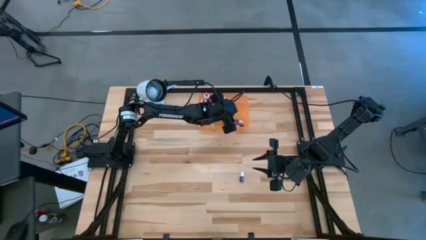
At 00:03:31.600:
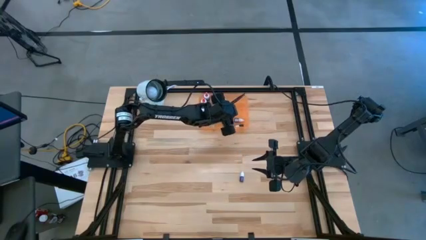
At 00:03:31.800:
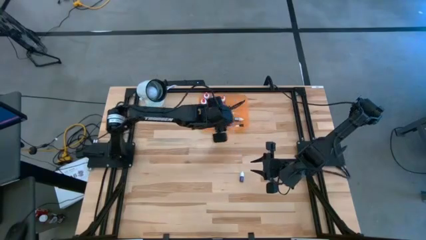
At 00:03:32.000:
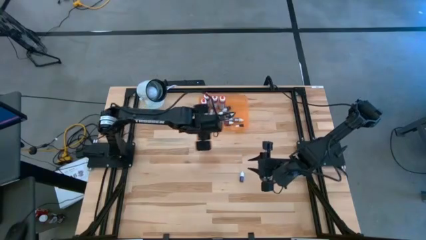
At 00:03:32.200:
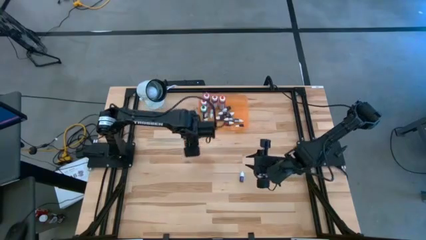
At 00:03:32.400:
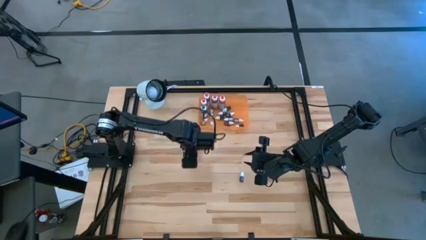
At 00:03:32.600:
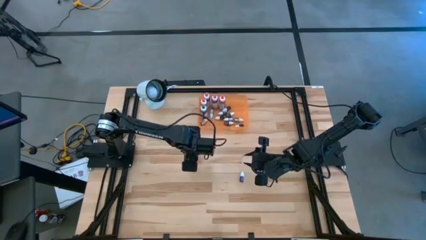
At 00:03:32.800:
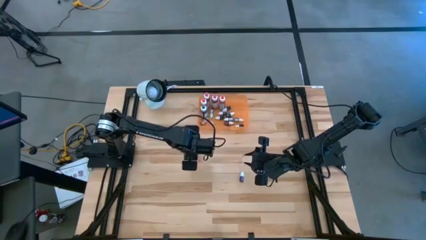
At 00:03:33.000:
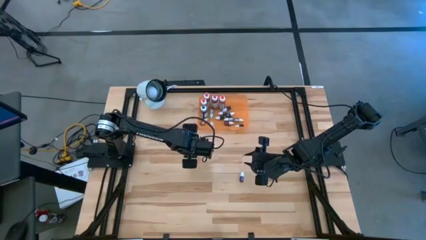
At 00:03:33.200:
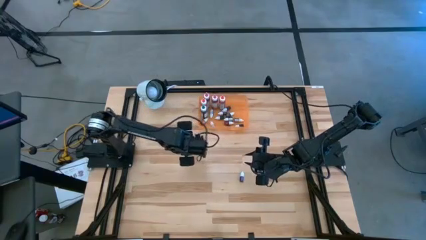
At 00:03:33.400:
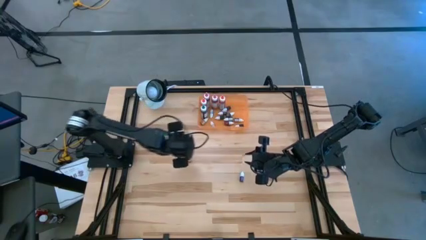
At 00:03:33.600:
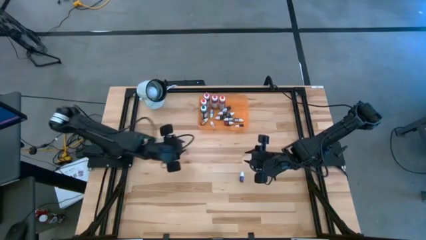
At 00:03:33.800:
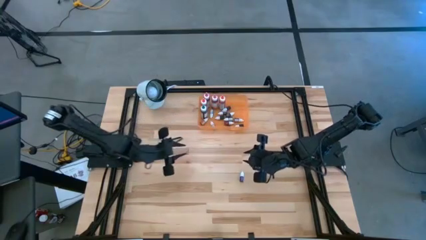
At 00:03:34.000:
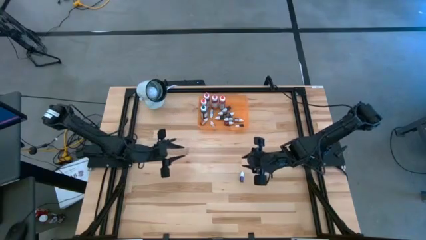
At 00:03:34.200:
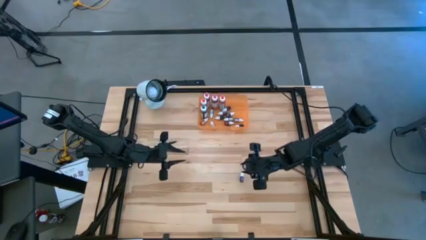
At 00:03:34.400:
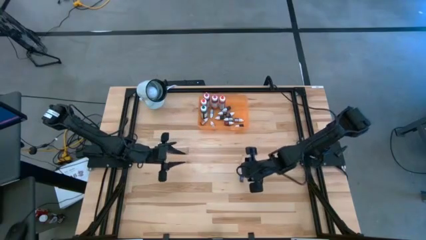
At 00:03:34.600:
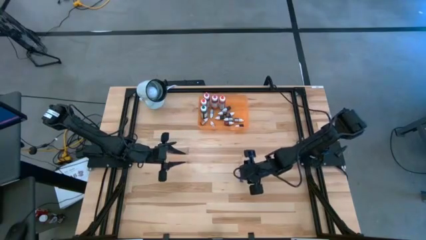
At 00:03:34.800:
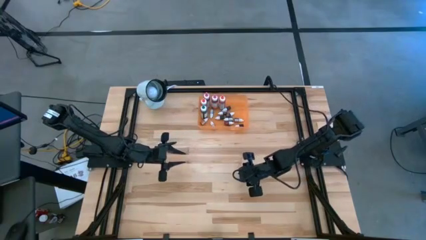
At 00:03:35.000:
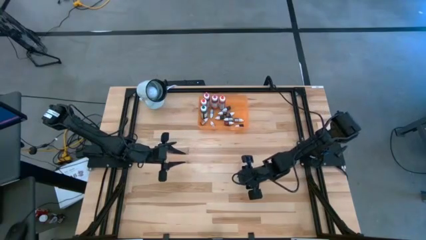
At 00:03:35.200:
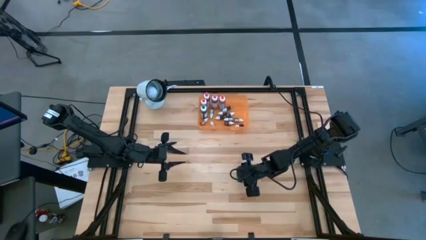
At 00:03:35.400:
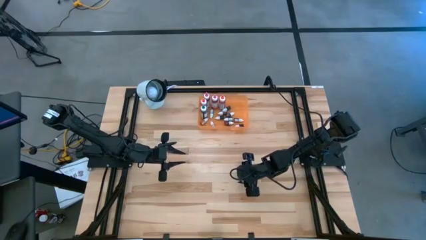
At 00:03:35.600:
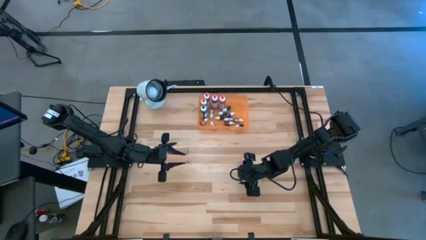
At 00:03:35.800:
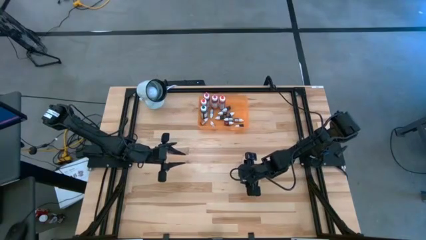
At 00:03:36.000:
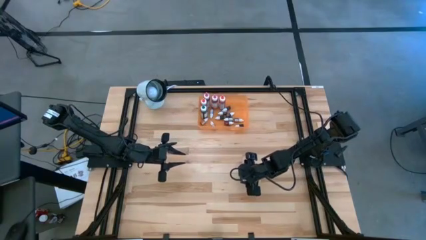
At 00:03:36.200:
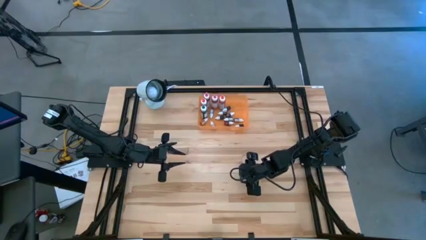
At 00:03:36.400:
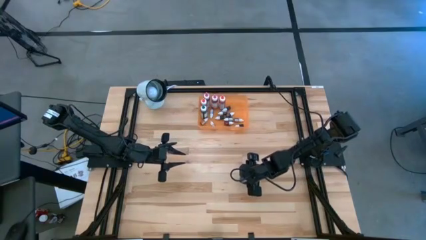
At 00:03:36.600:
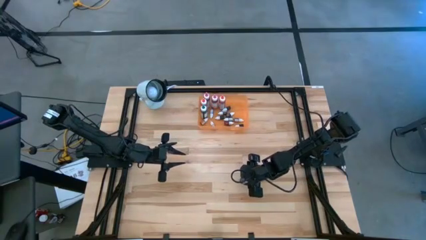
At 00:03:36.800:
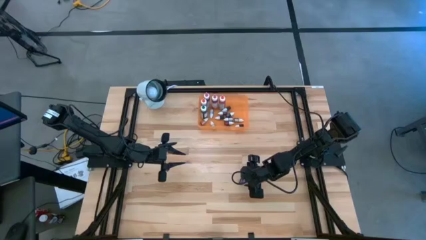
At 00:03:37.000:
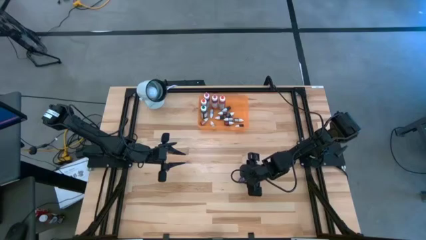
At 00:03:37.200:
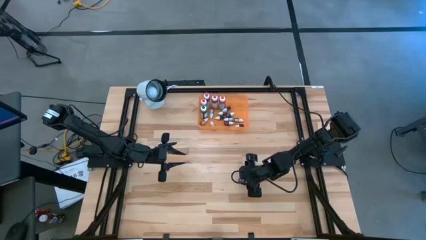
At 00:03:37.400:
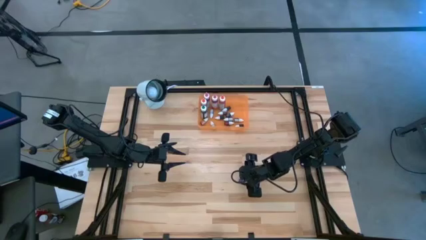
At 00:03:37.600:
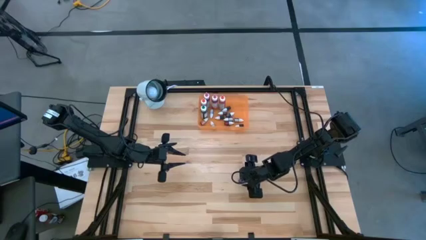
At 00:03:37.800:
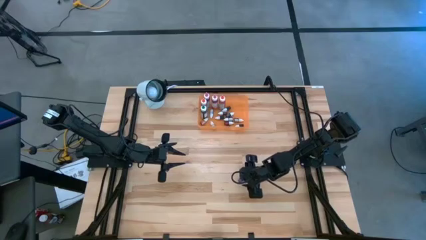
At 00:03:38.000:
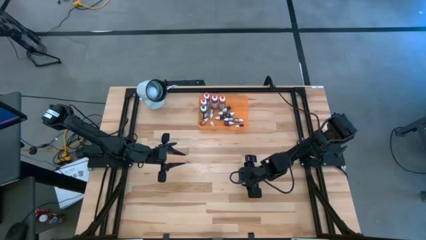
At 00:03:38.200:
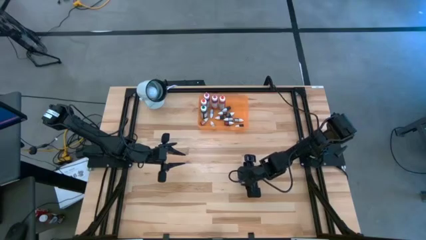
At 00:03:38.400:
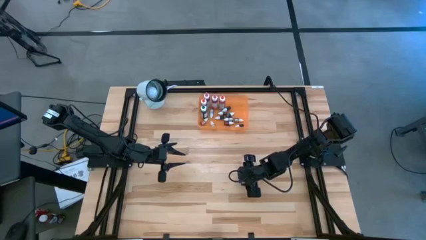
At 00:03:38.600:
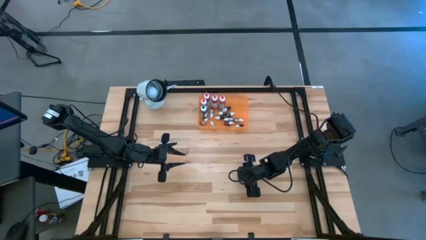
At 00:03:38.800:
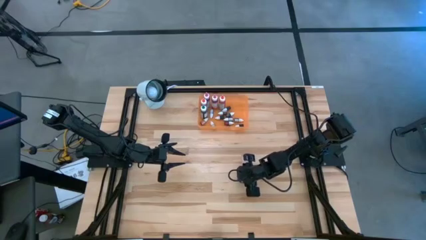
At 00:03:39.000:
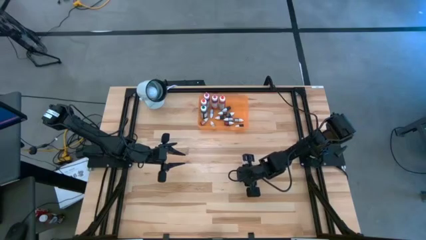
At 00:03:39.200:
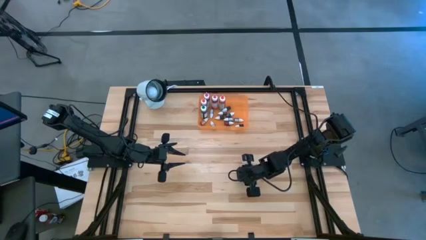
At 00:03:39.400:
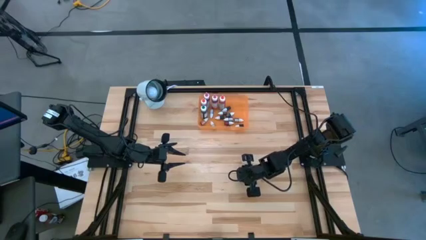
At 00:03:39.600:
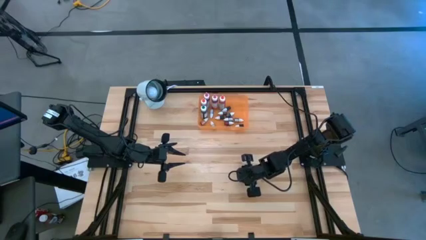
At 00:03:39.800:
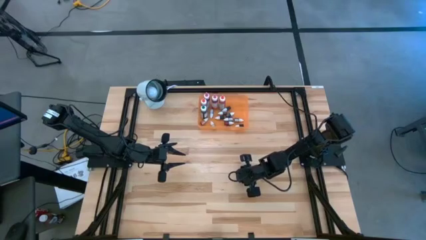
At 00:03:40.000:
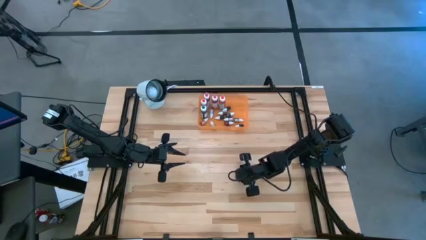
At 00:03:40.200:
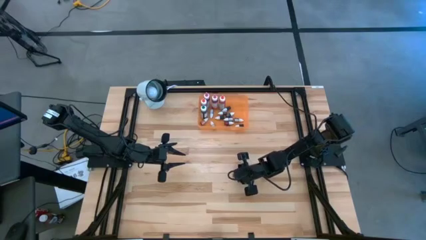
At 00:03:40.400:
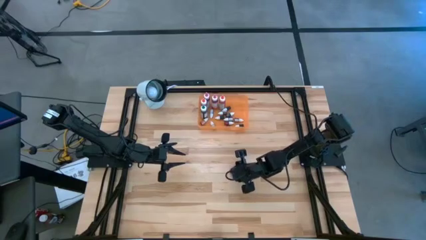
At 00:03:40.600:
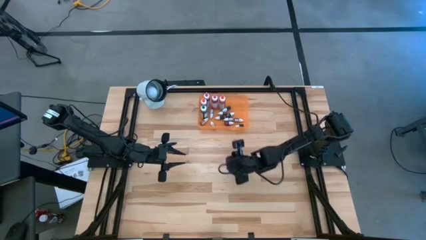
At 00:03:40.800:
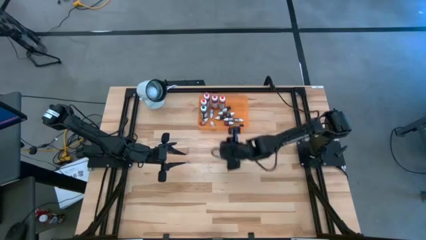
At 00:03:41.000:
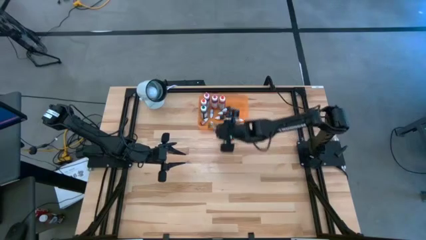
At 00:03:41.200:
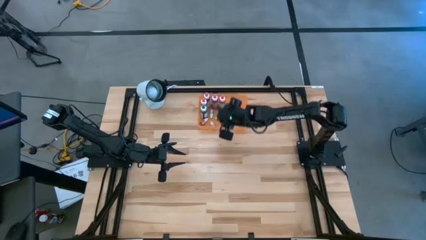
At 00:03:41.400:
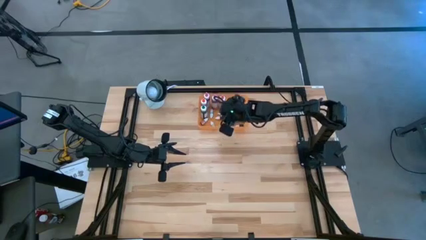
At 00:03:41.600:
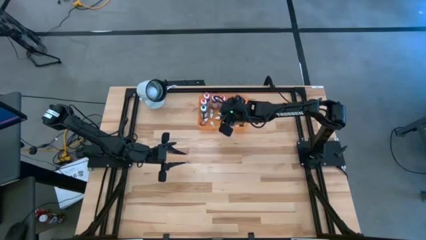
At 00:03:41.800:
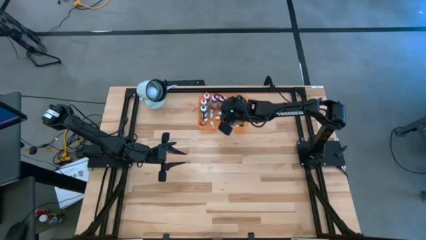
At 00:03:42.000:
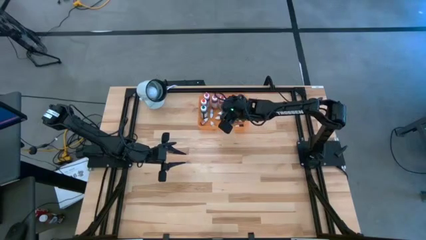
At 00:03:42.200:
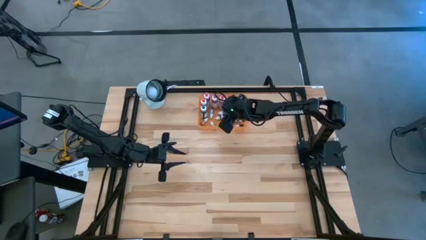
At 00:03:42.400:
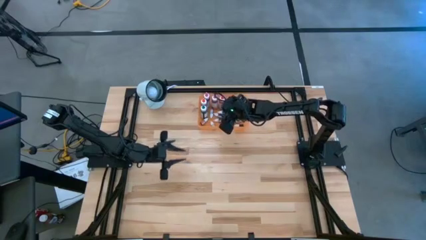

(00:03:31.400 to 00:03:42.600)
Task: Pick & Place food coloring
Put the purple small food coloring bottle into the orange bin
